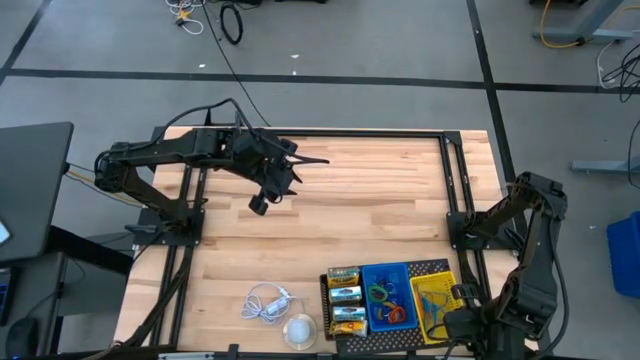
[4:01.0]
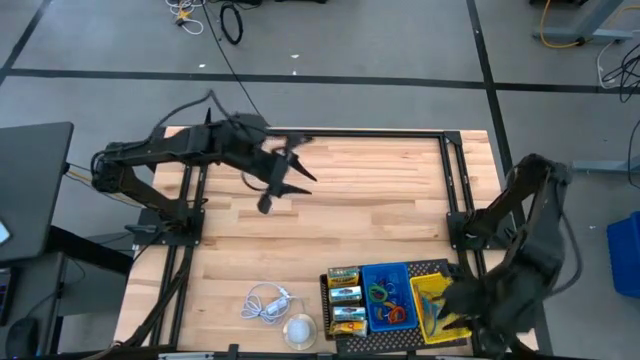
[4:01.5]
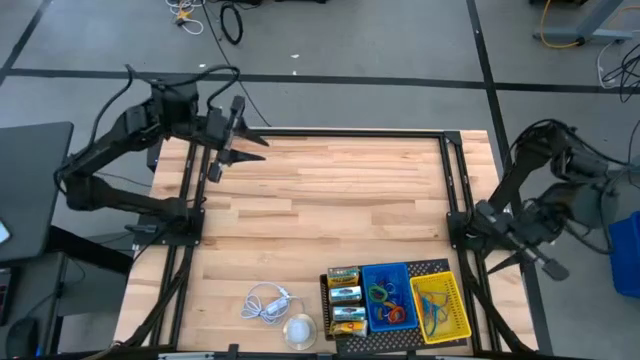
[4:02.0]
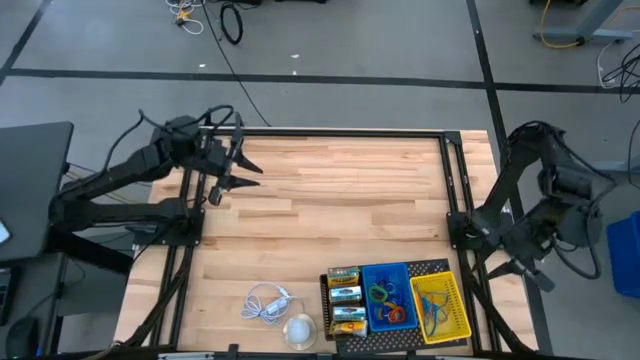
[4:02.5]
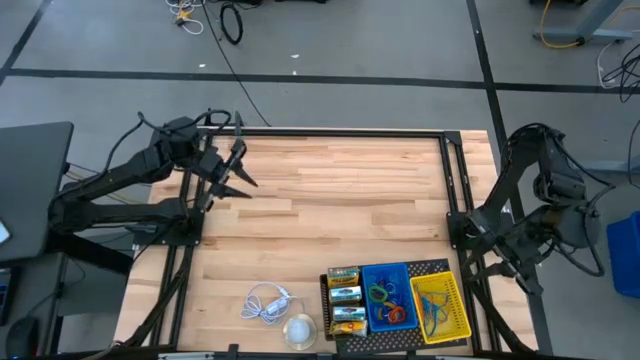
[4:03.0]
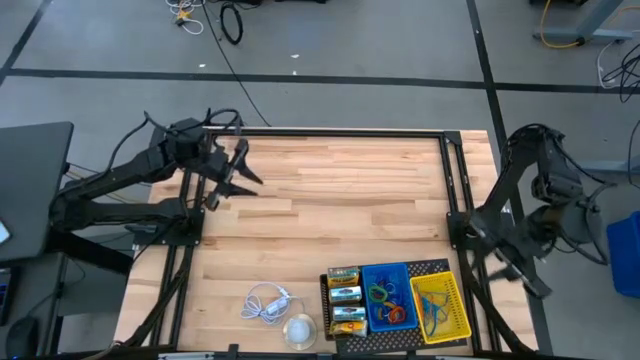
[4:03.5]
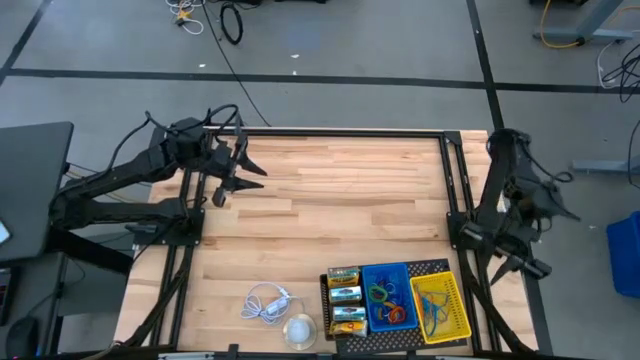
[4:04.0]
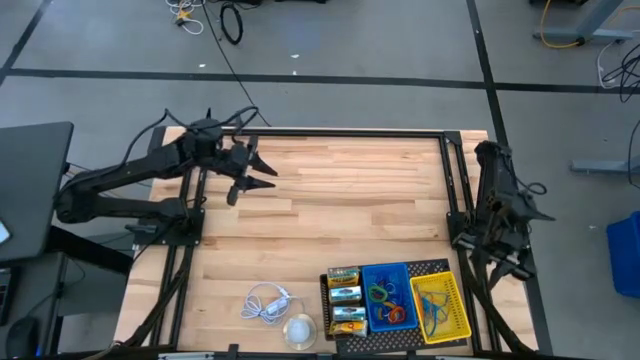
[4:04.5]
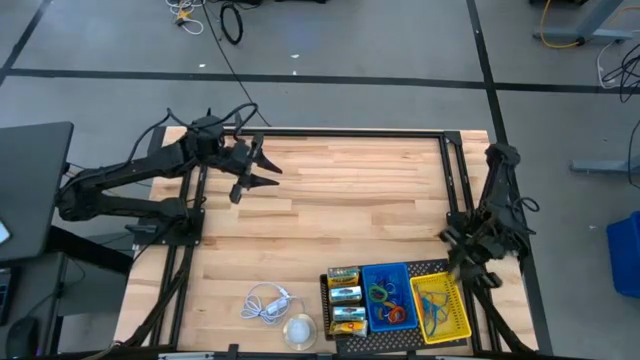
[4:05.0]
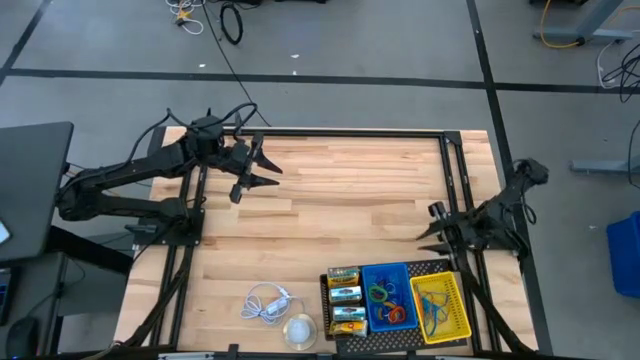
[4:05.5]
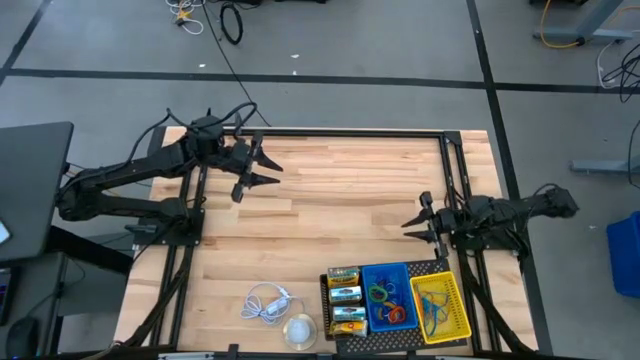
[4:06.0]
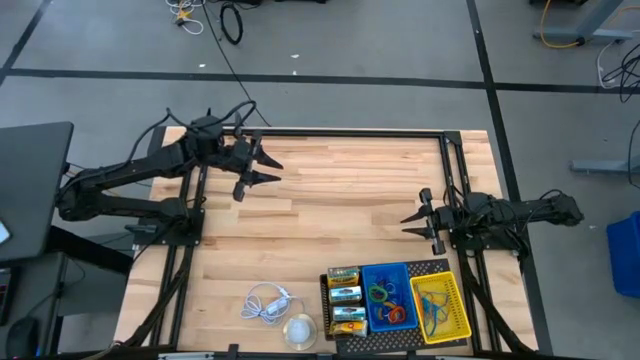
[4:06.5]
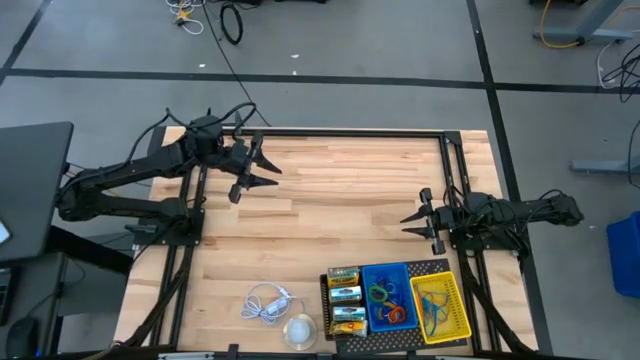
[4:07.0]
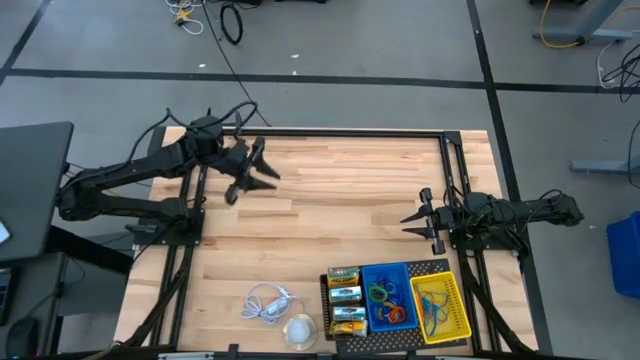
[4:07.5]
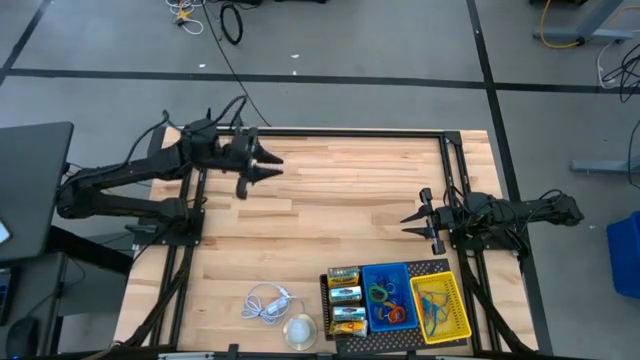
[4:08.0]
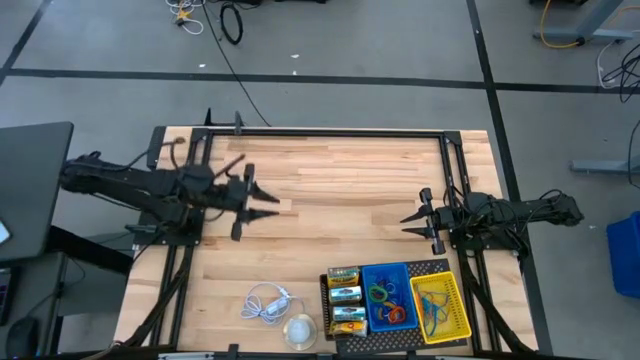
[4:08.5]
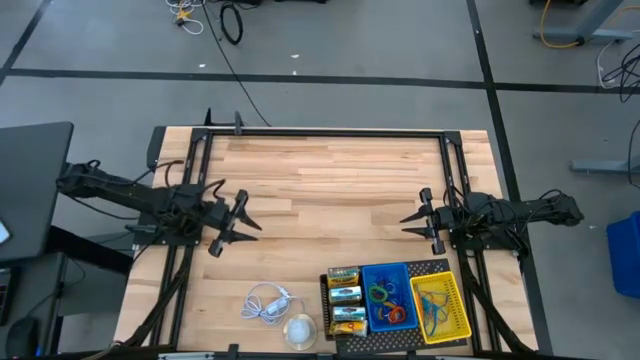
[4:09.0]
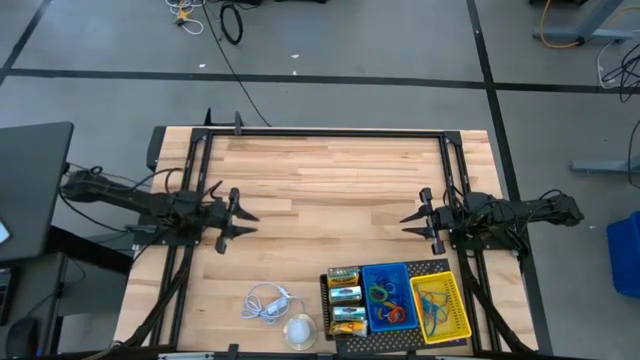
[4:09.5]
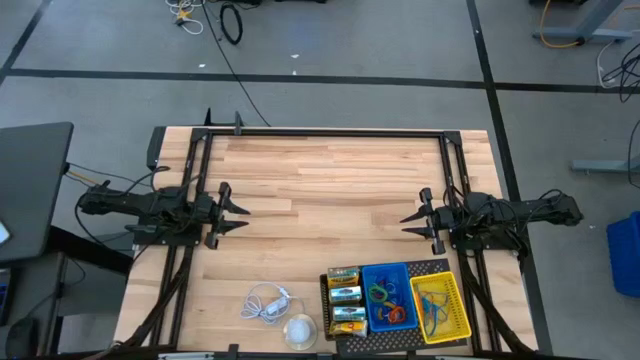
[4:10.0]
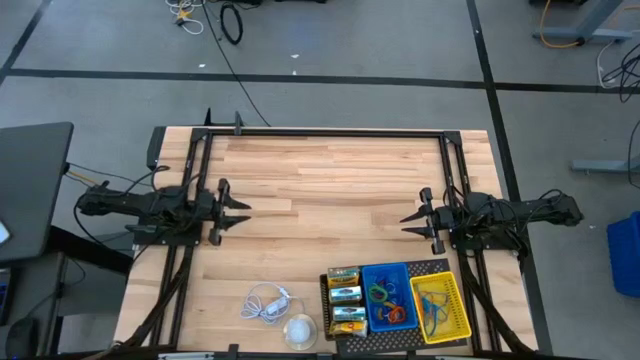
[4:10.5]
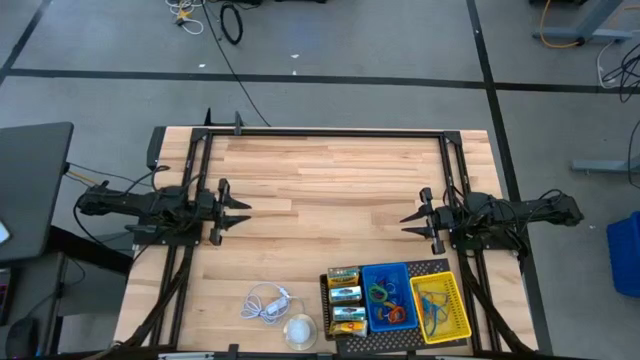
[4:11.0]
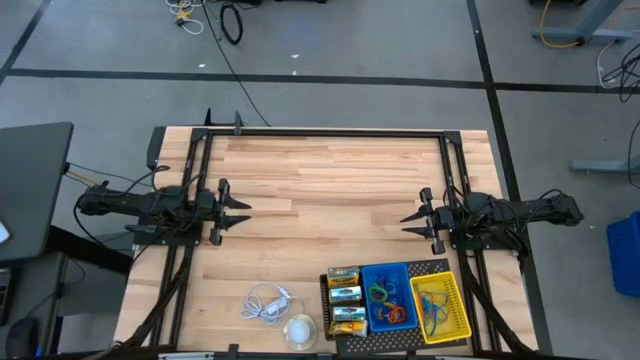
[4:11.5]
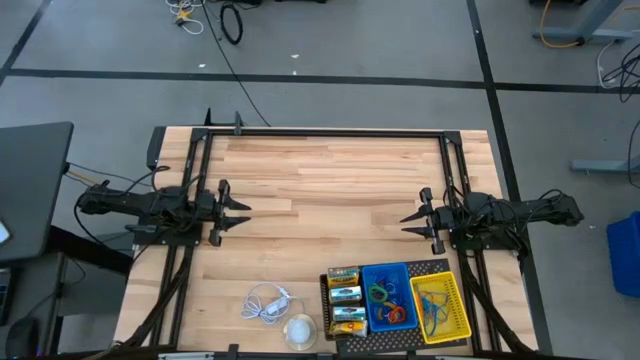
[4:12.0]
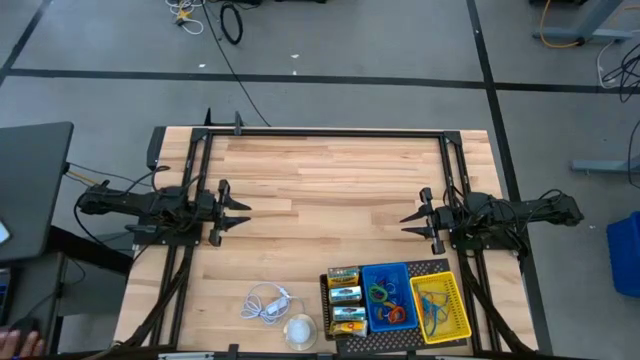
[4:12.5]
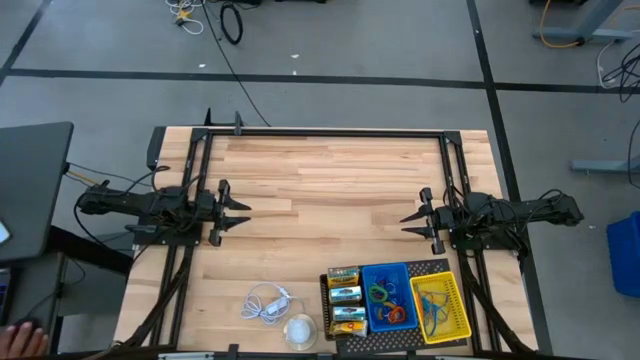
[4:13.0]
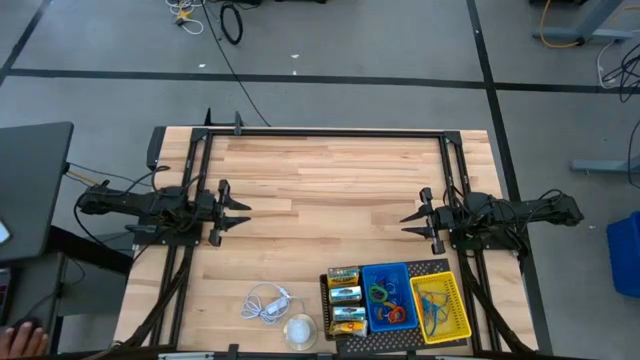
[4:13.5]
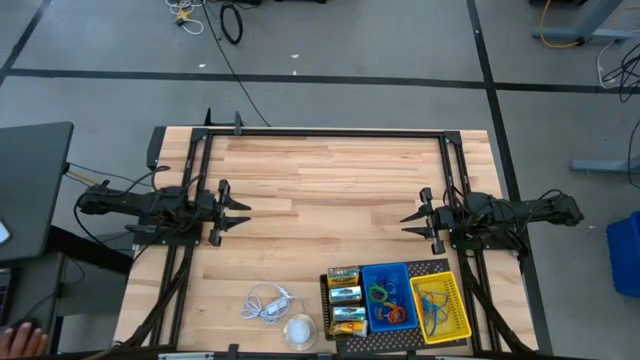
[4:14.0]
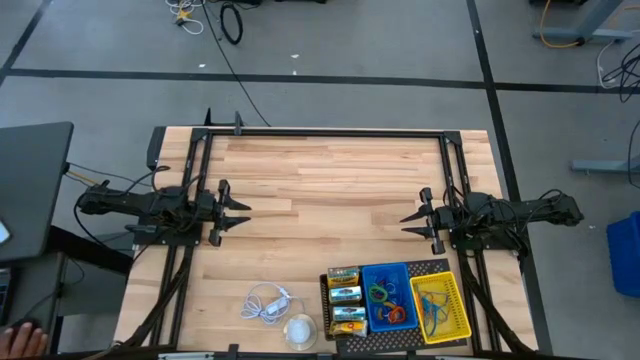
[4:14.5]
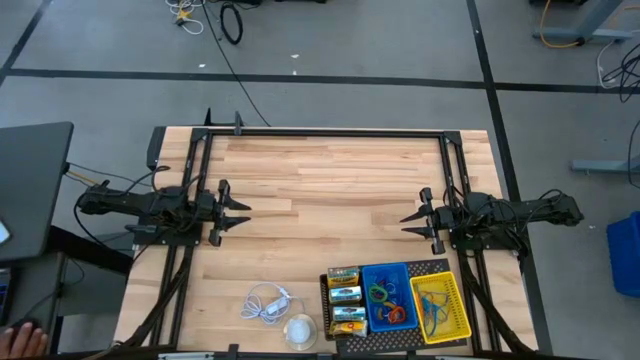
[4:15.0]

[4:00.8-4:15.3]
Task: Pick & Place Office Desk Supplies
Return to Home Position

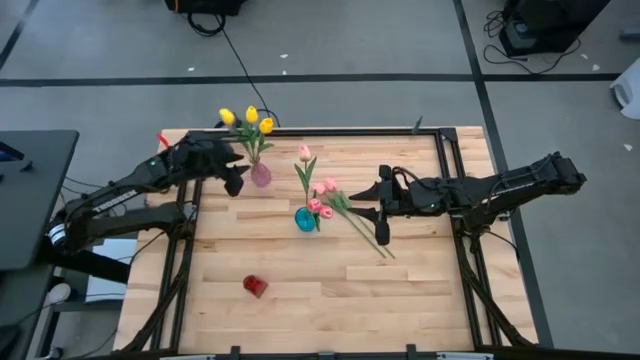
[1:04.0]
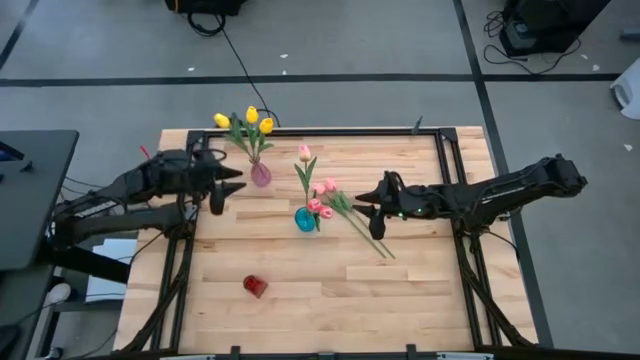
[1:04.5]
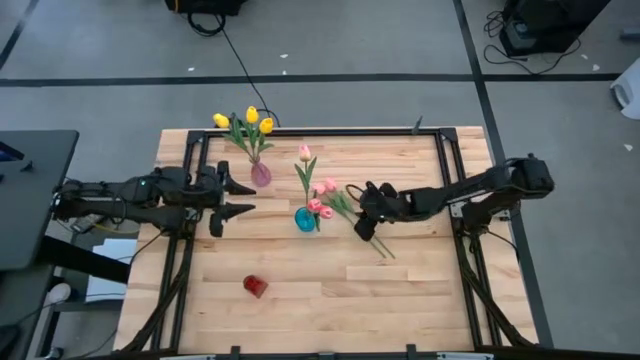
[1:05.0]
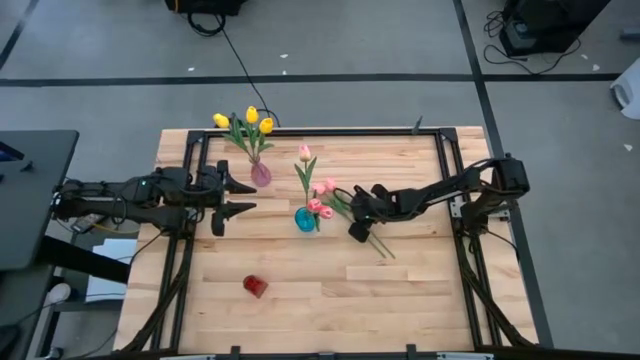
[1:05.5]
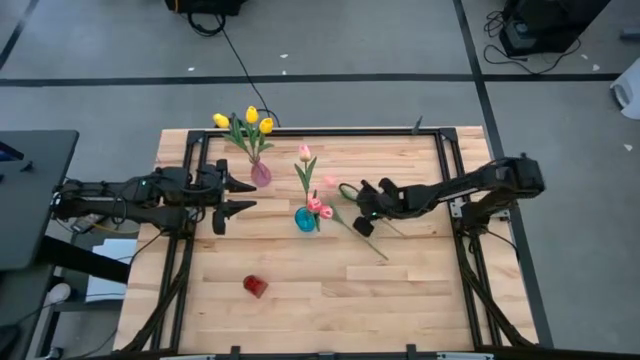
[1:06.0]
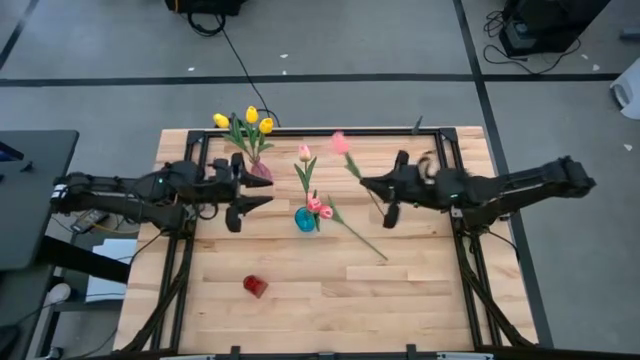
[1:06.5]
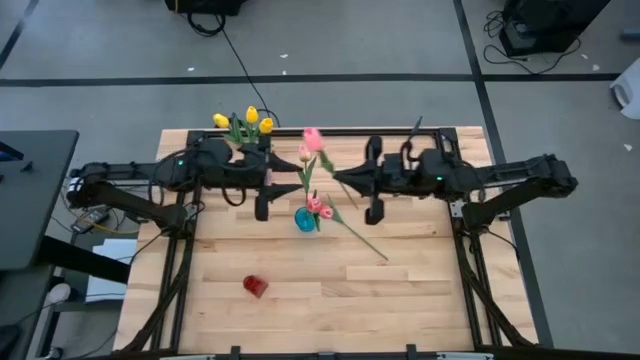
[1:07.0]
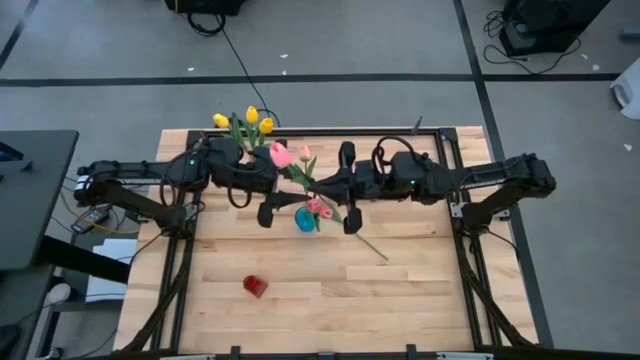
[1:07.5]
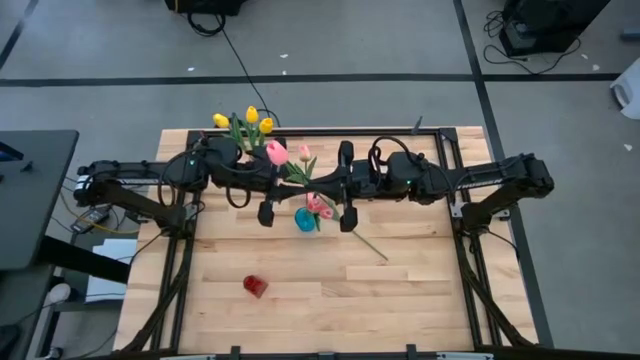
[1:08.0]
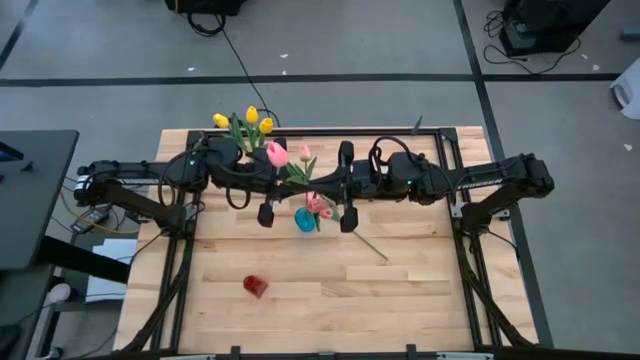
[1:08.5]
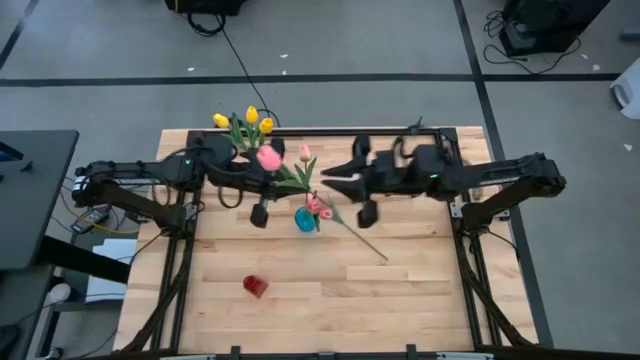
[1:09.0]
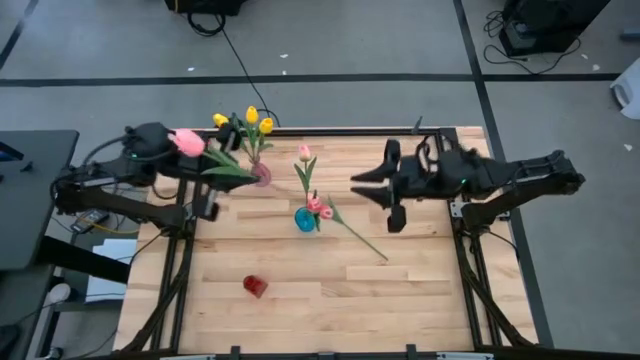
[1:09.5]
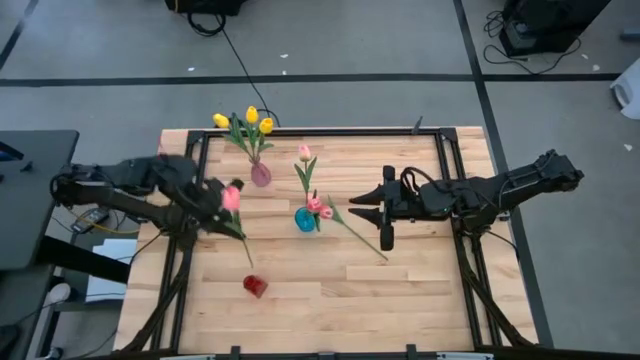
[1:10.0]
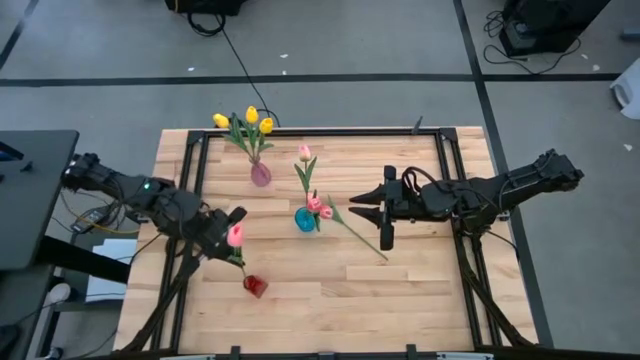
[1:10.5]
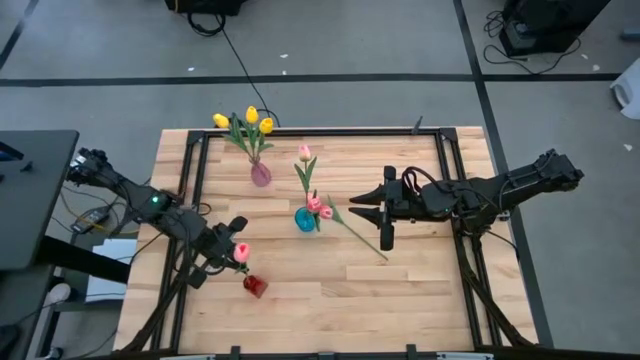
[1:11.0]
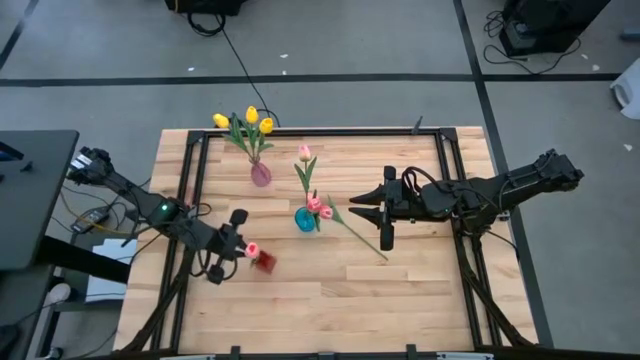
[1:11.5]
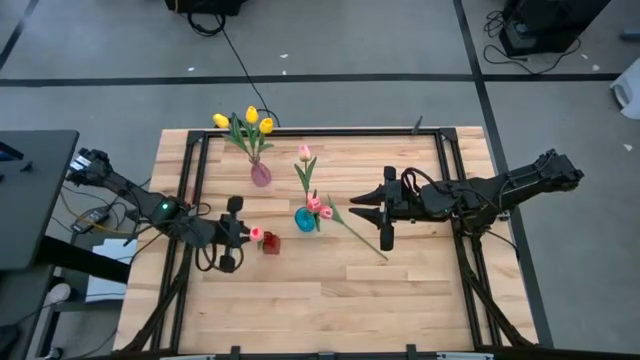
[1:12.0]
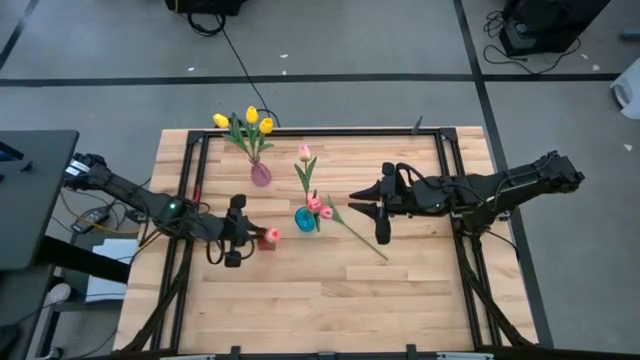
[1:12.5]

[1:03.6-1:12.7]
Task: Sort flowers into vase by color
Put the pink flower into the red flower vase
